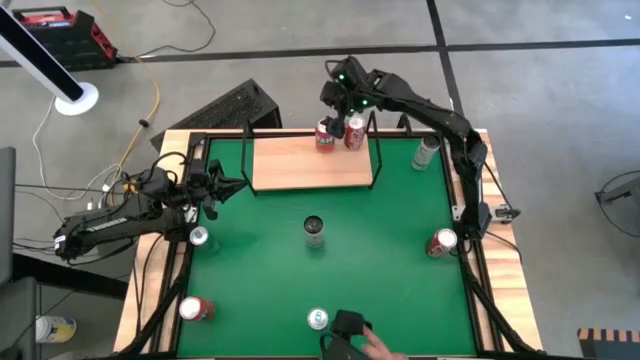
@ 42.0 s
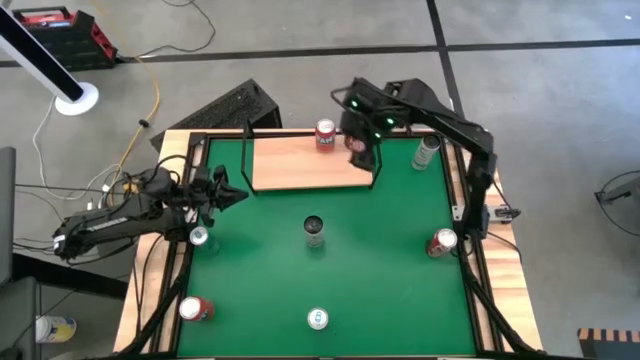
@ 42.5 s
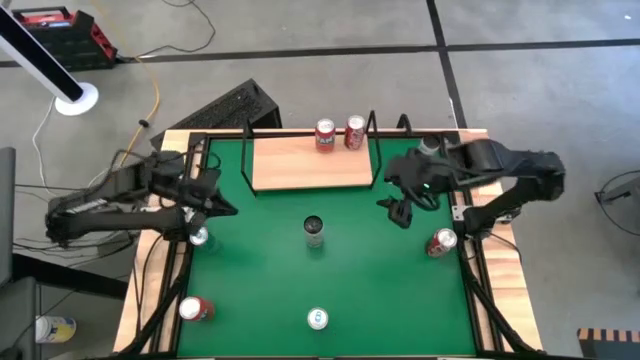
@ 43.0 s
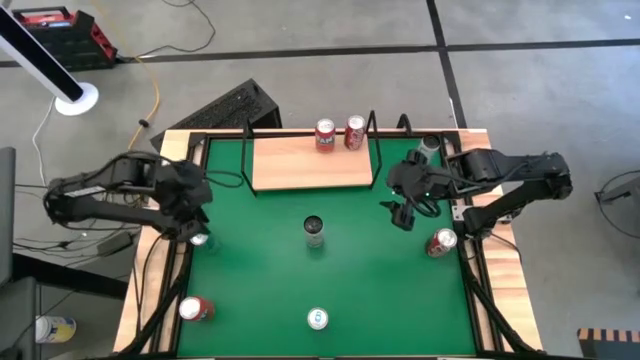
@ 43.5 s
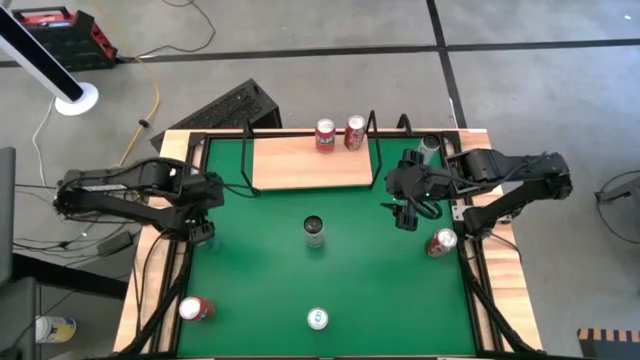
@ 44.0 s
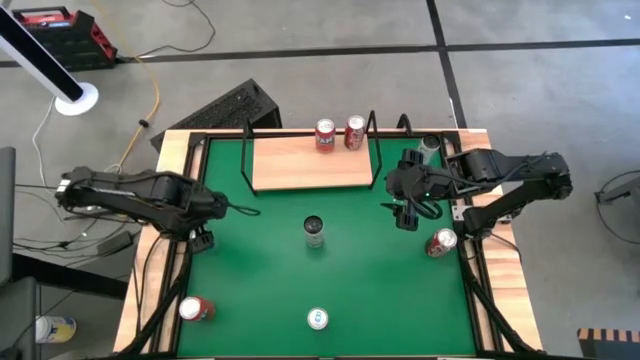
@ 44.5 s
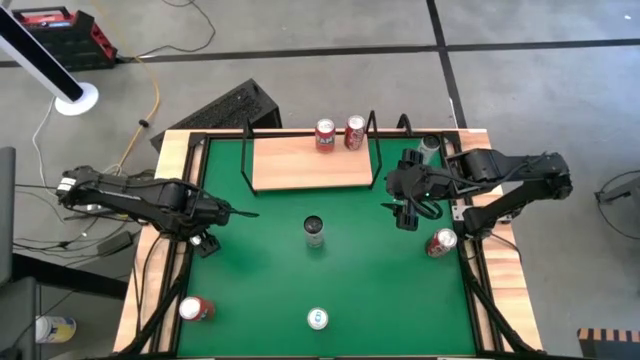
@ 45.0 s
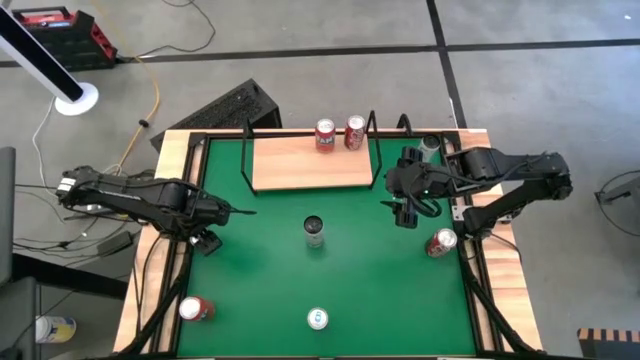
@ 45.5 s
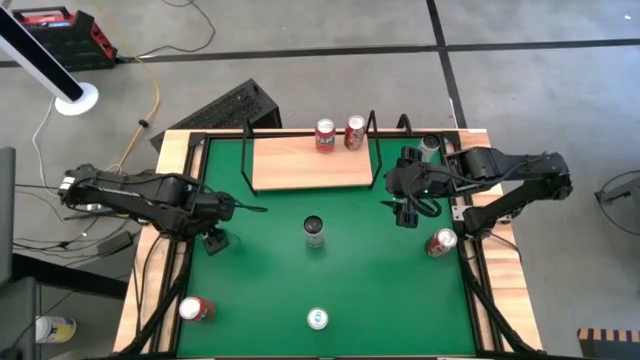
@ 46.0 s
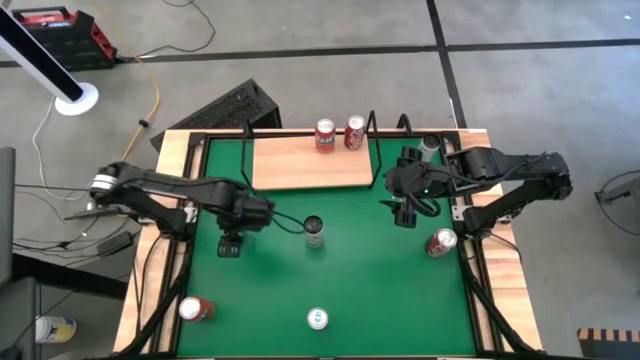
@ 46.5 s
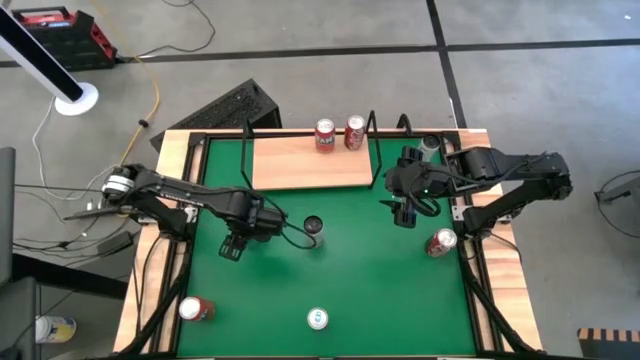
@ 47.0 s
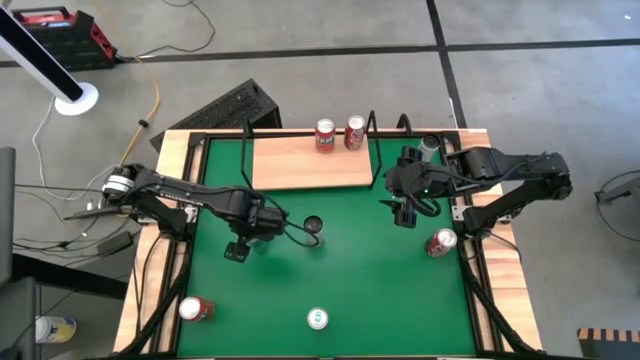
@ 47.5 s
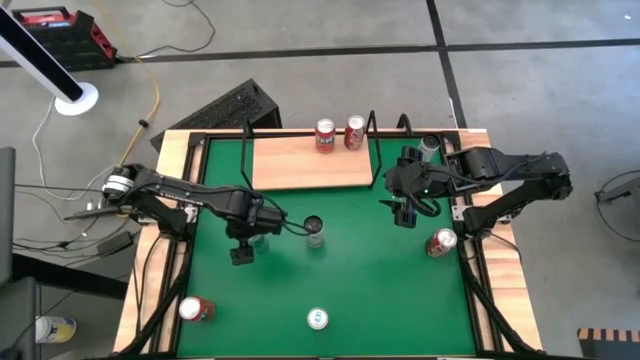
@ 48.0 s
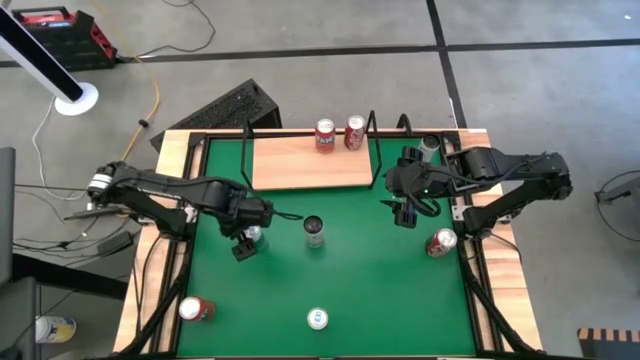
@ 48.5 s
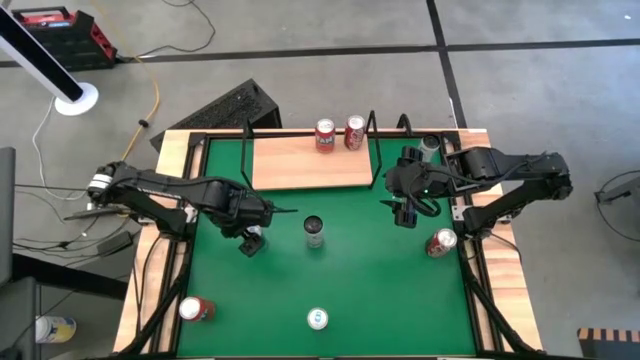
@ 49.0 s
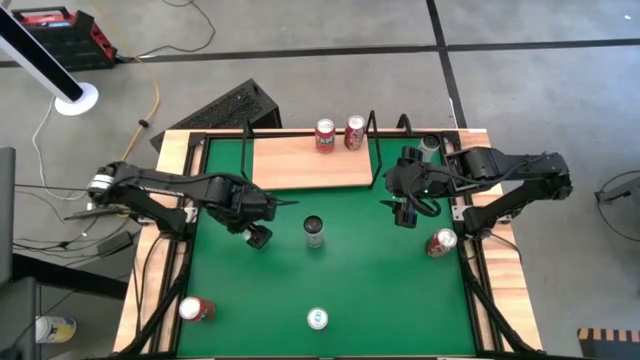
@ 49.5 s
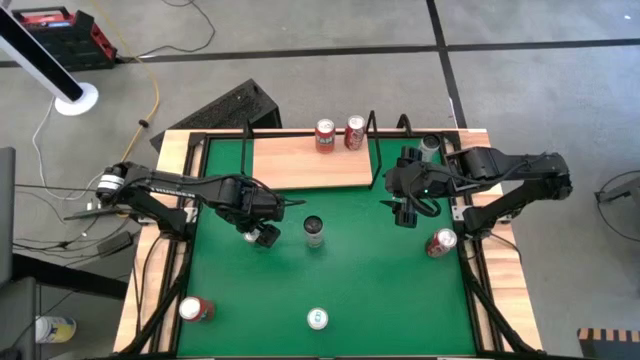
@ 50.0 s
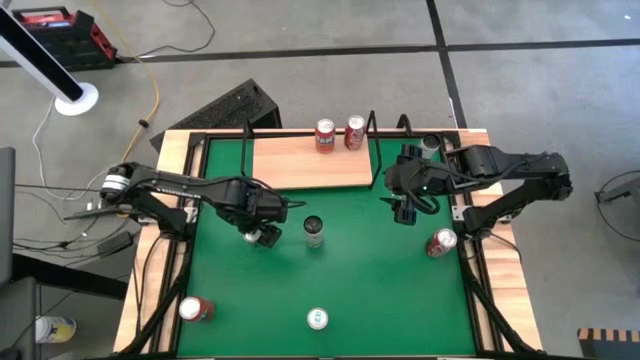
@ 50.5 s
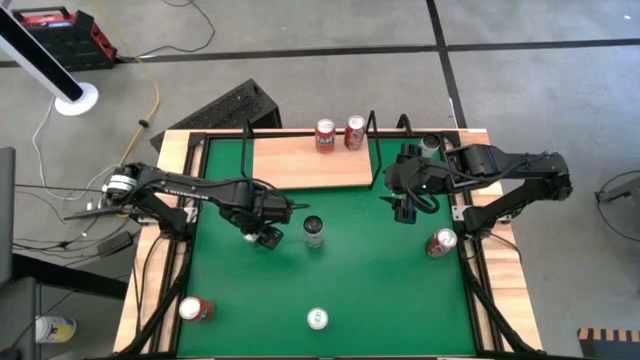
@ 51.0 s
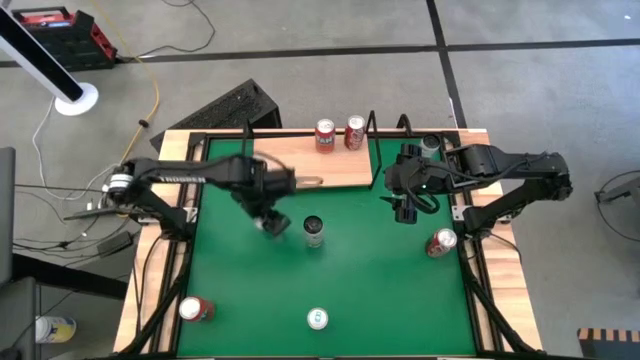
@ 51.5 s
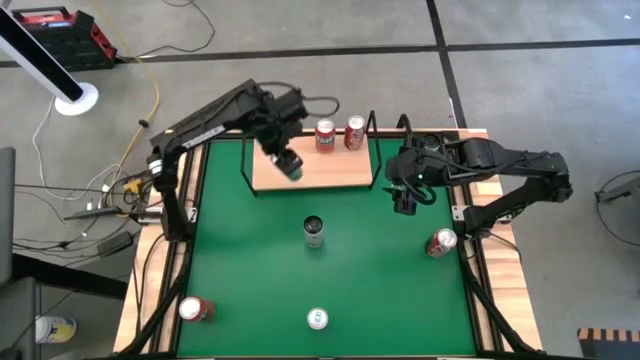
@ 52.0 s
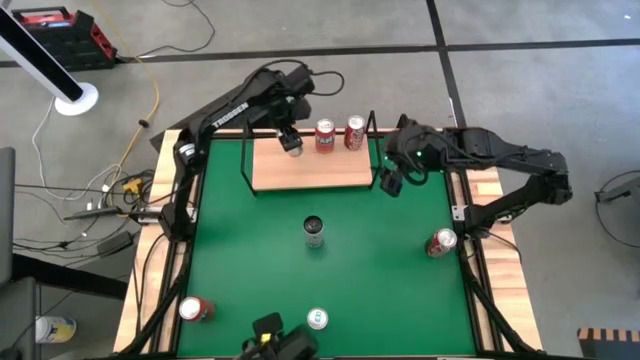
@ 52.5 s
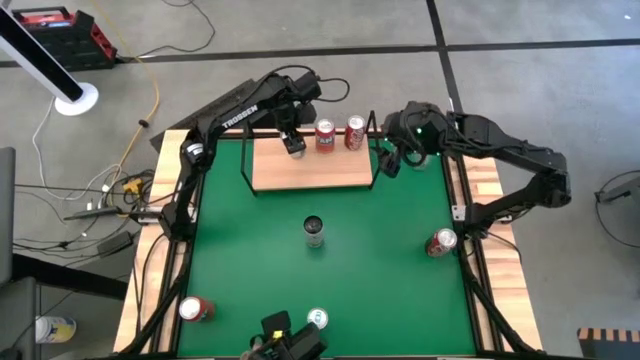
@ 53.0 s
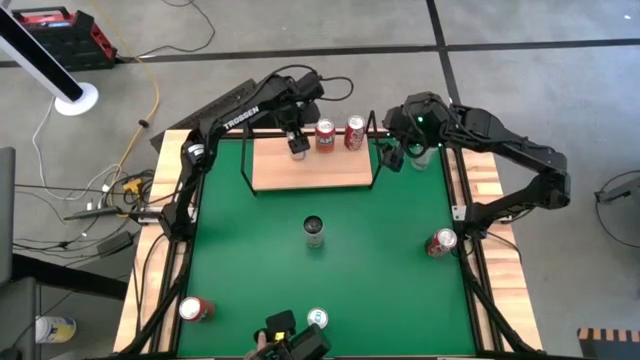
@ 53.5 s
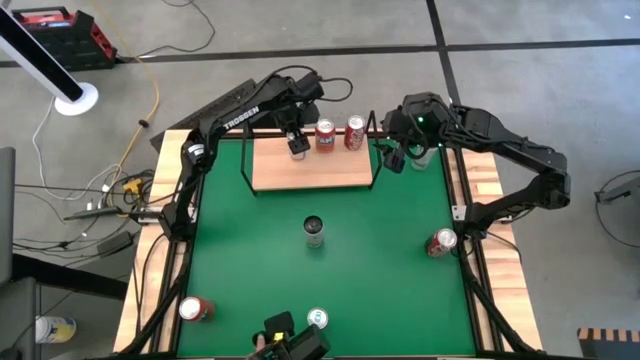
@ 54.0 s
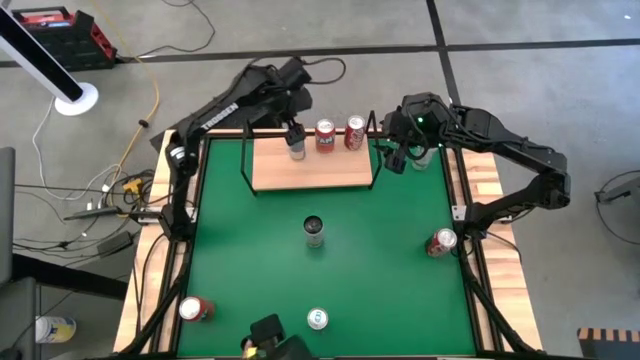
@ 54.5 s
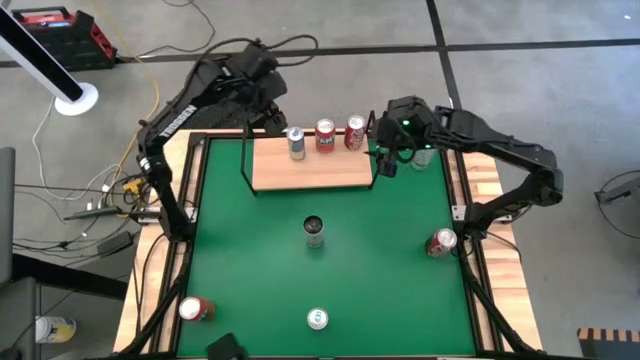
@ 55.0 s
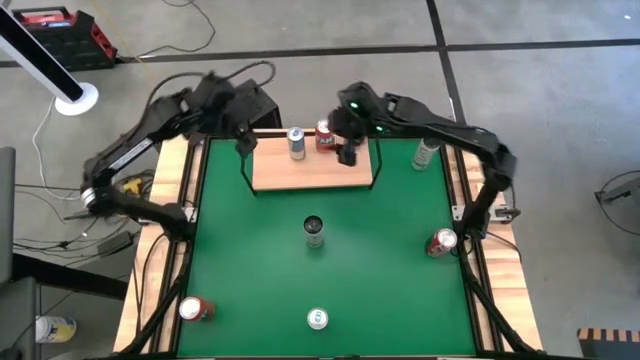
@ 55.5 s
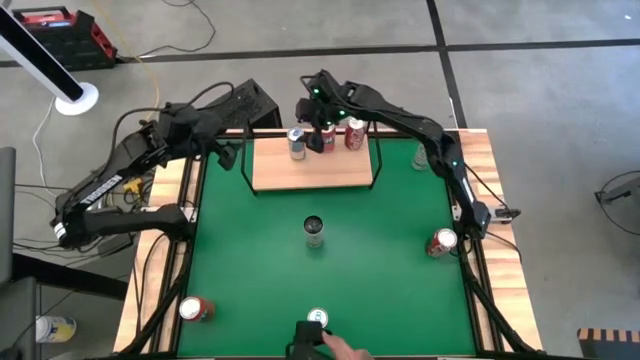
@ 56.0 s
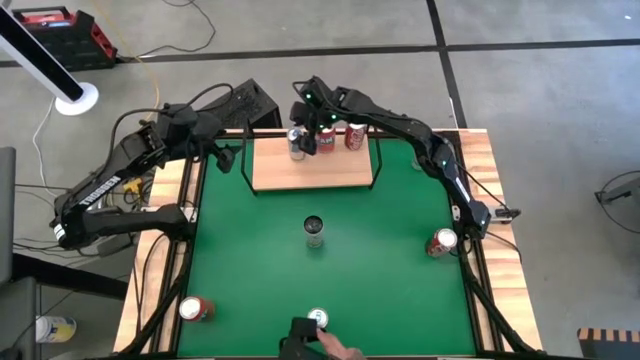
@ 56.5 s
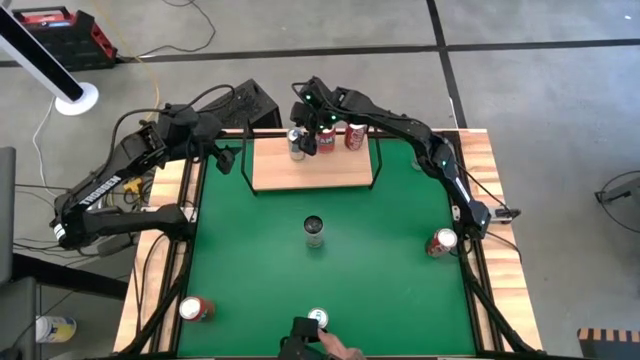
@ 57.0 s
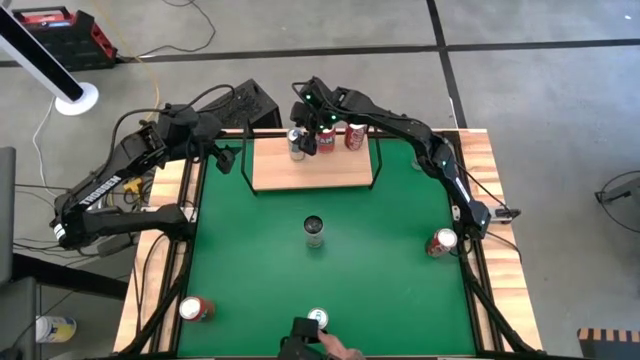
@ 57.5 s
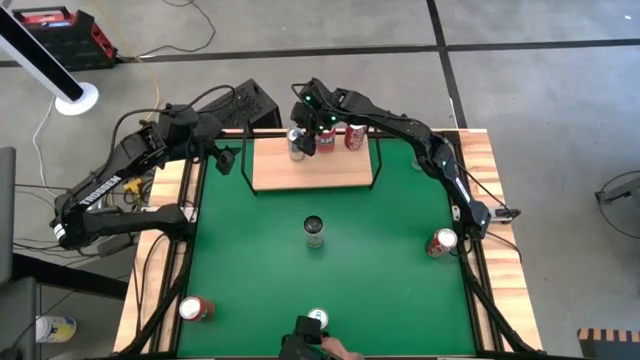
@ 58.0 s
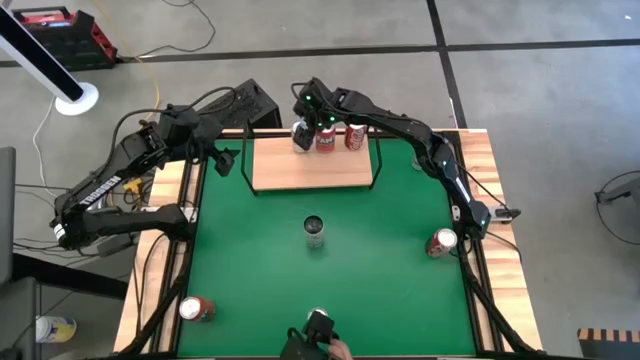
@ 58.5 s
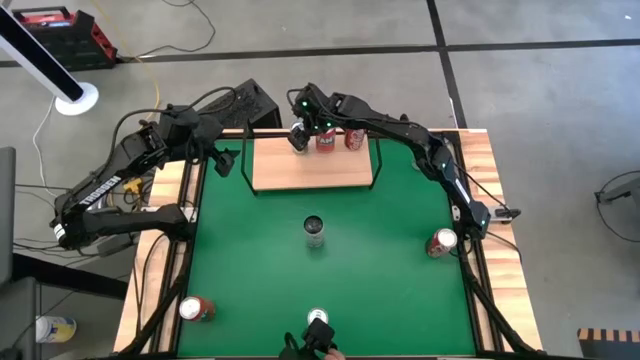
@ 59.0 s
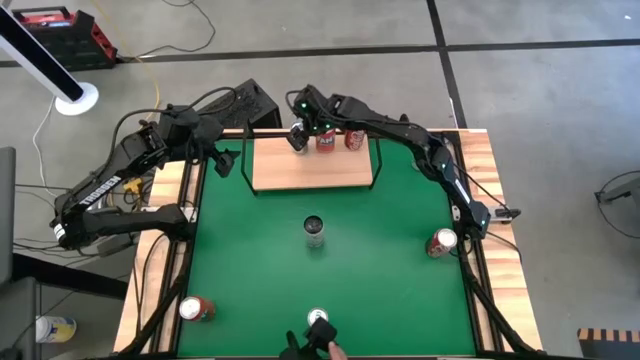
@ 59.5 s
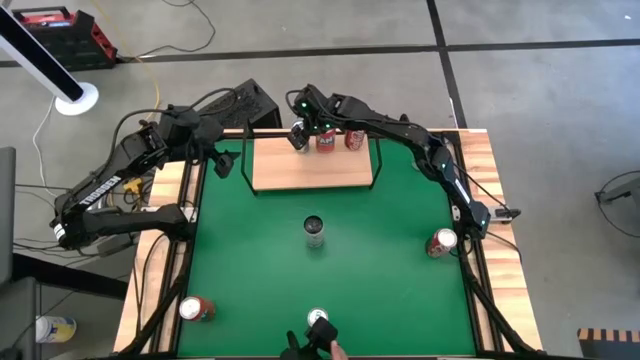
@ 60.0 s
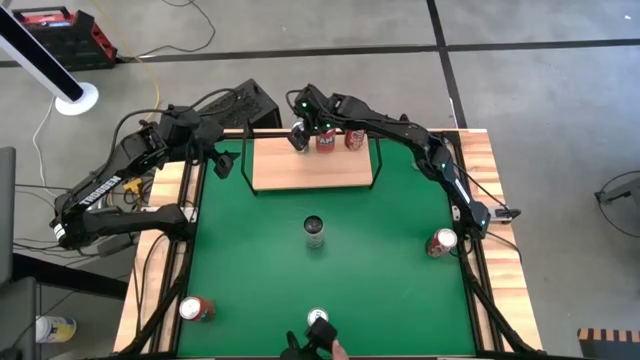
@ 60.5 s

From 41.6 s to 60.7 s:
Task: Place canned beverage on shelf
Put the left blue soda can on the shelf
